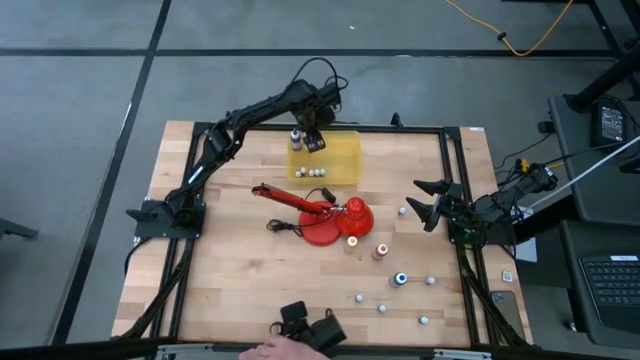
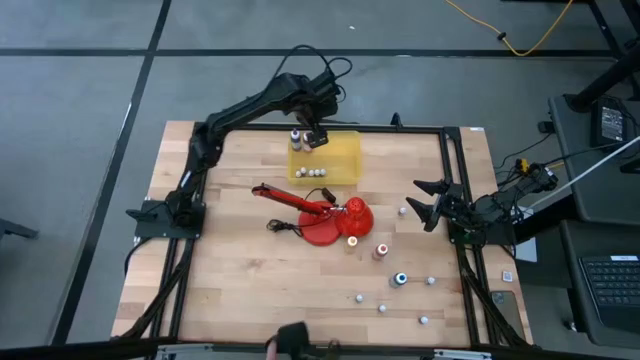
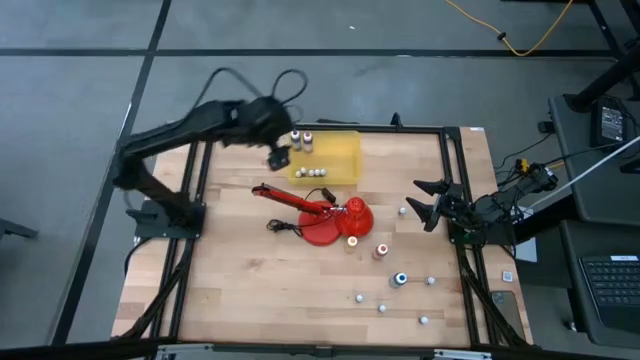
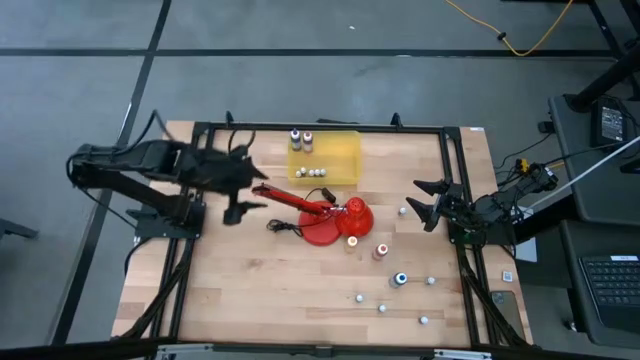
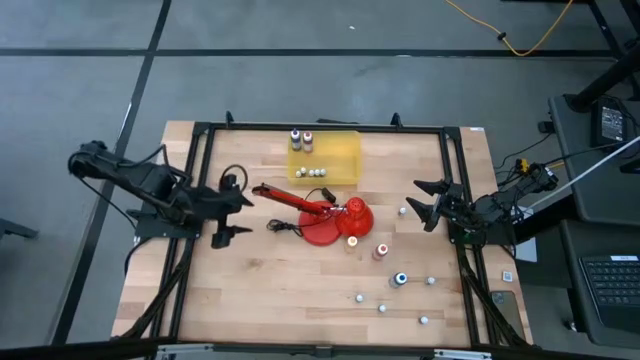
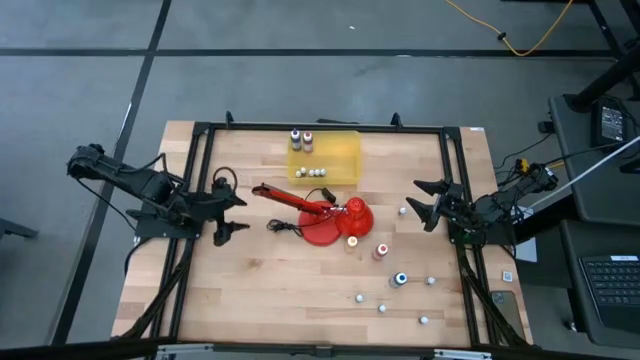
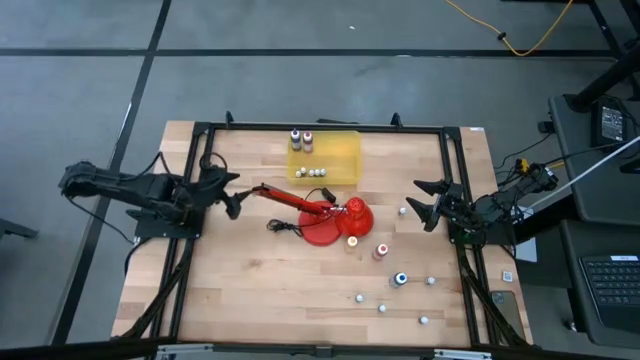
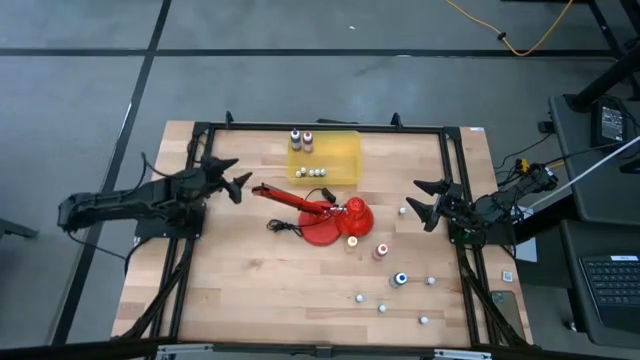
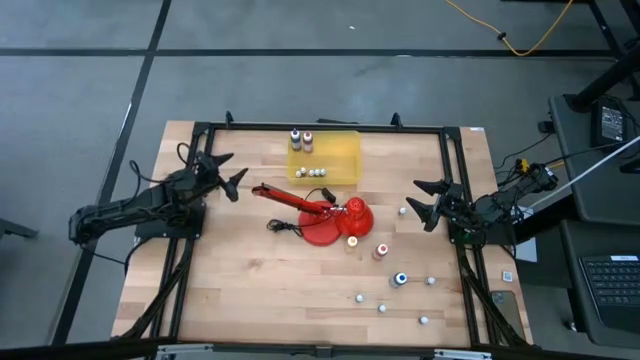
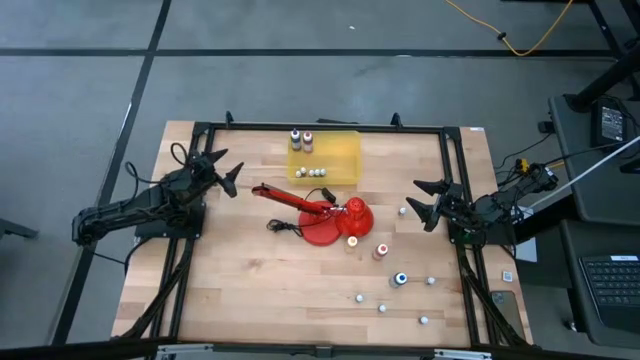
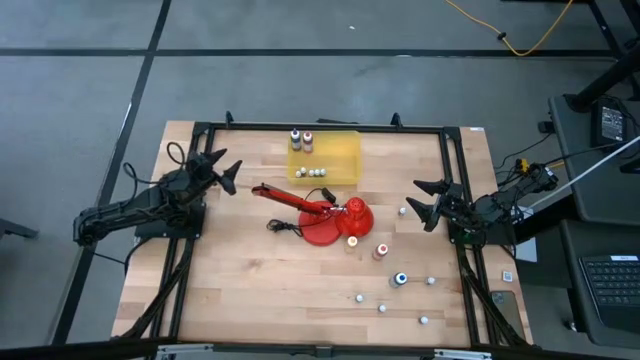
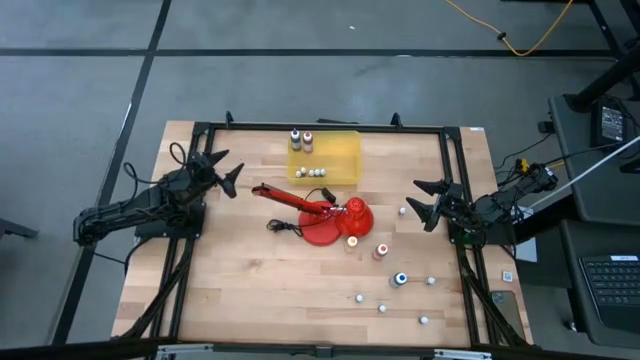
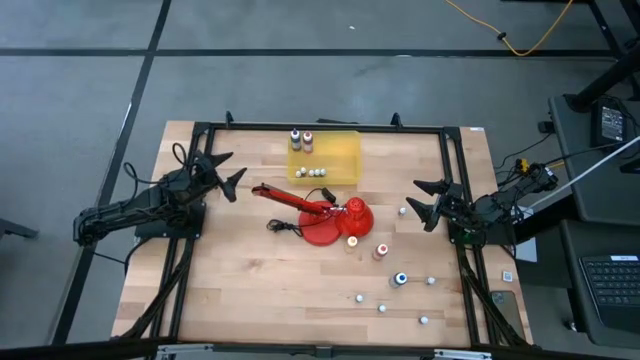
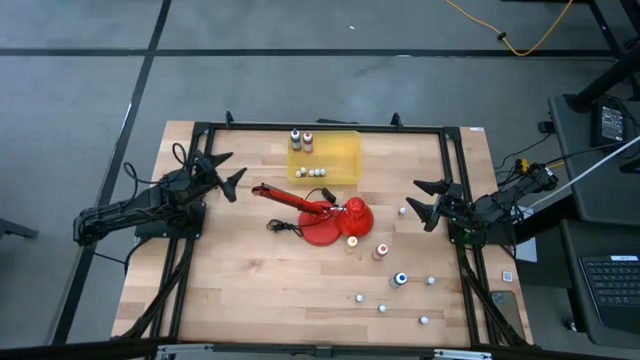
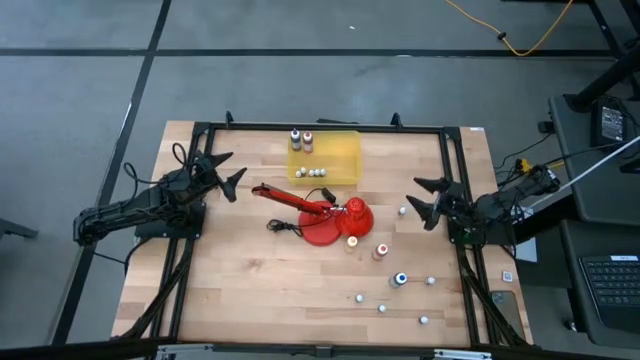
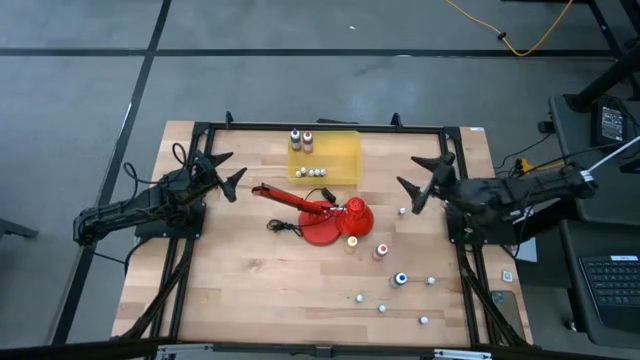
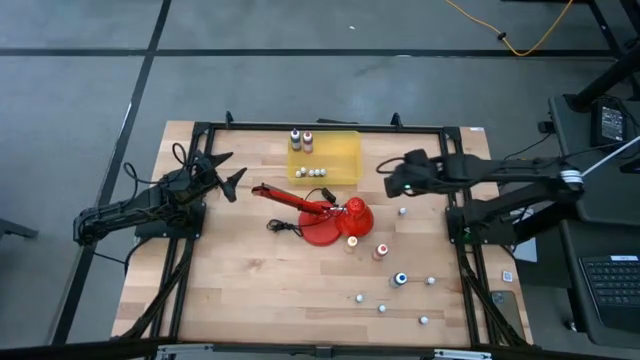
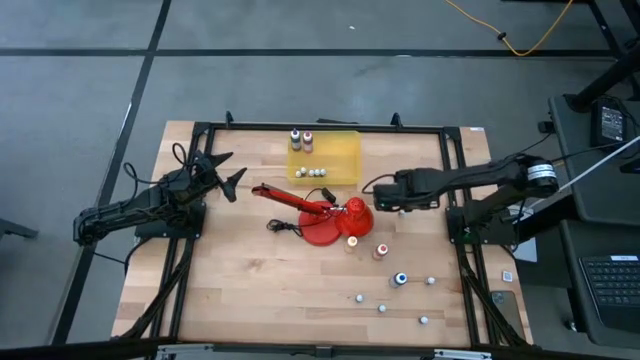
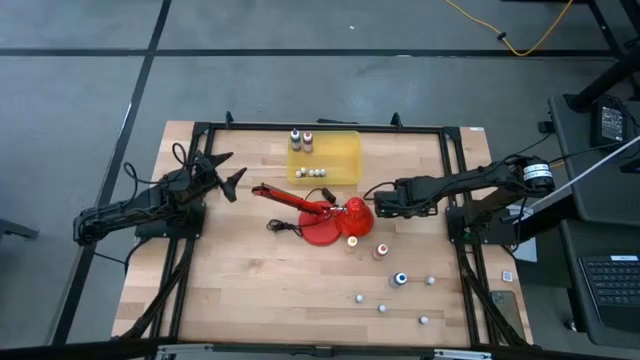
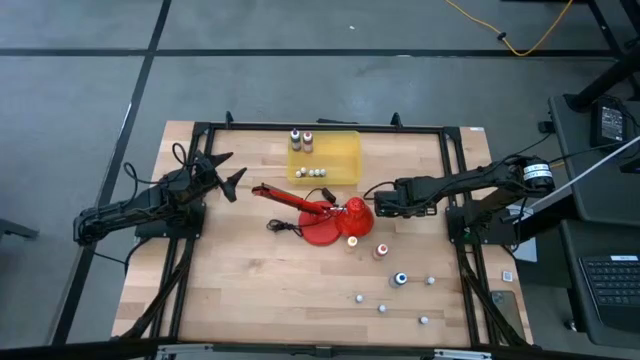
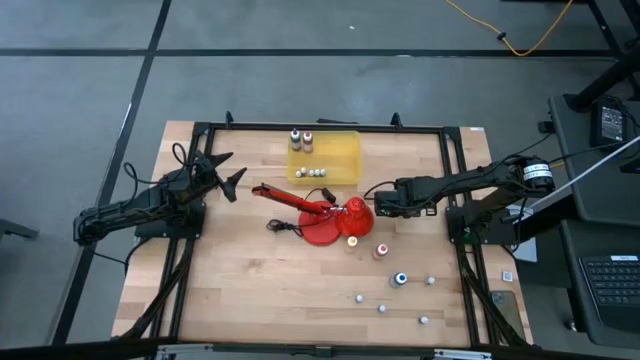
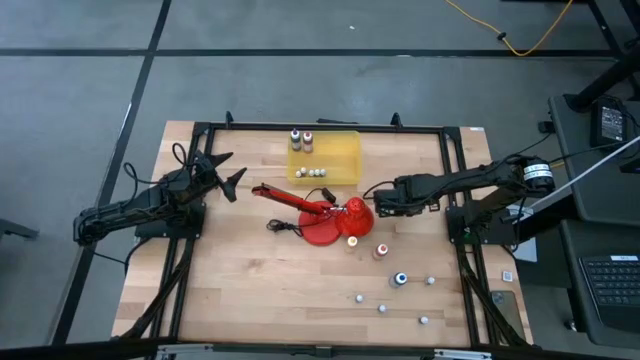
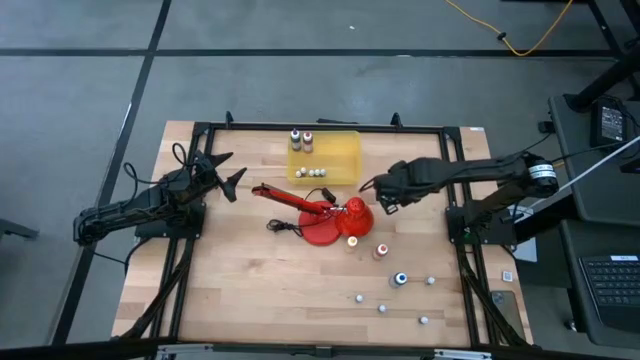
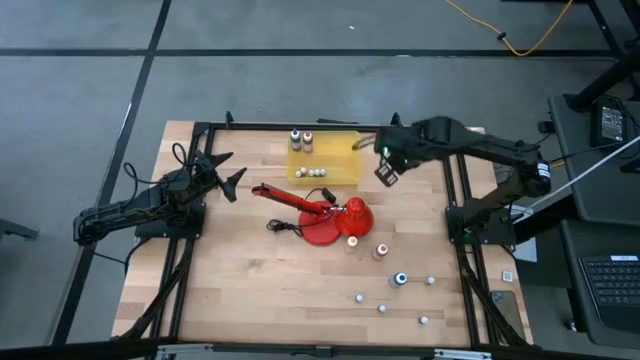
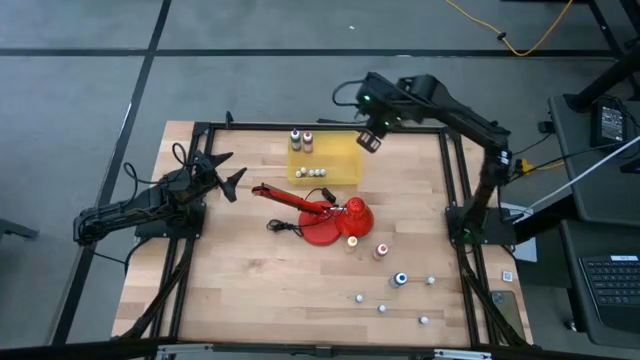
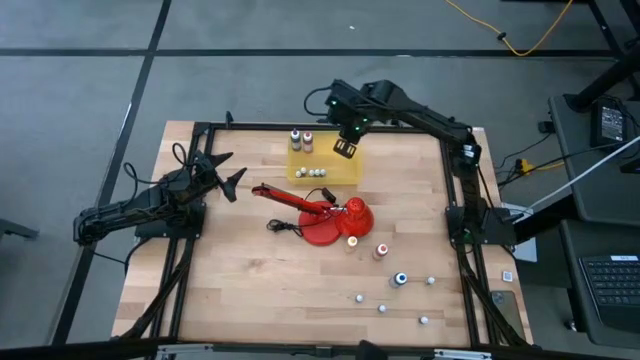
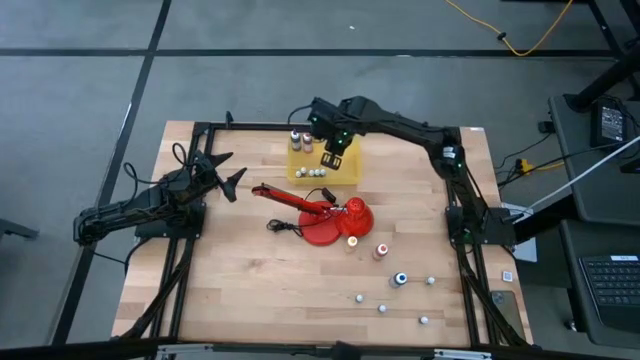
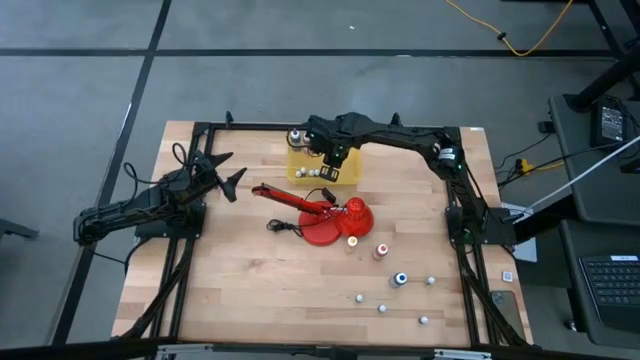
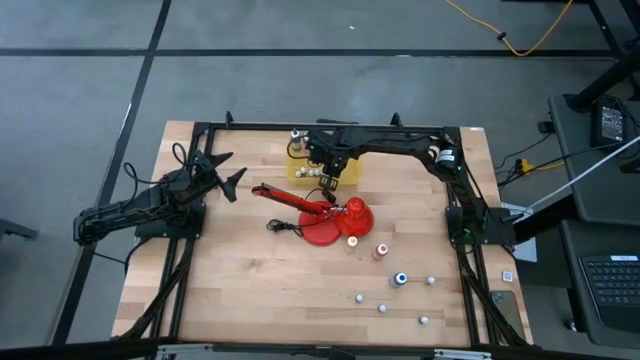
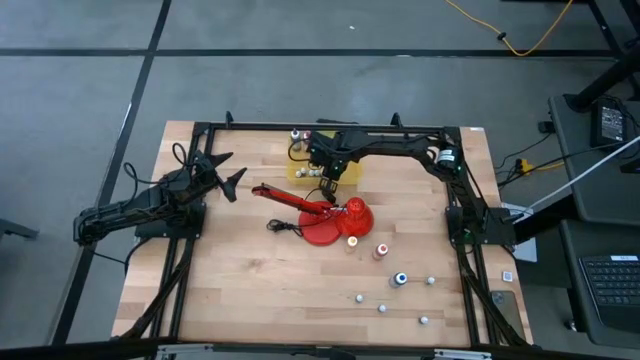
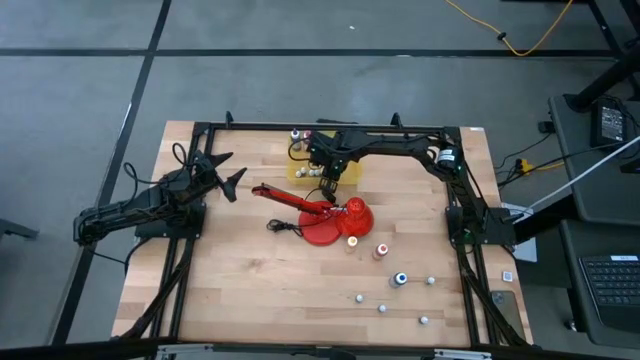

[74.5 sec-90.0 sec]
Task: Pick & Place food coloring
Put the black food coloring bottle into the yellow bin

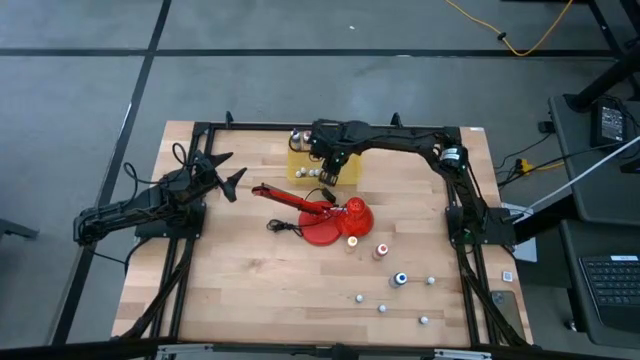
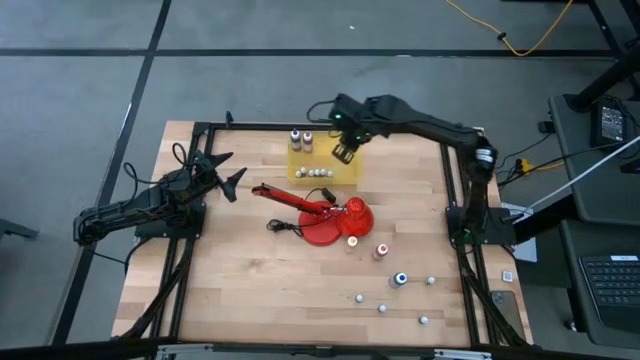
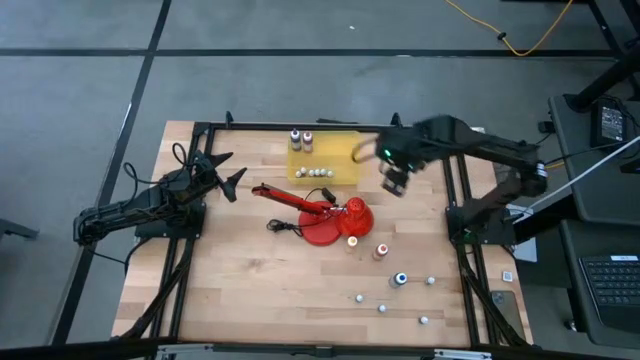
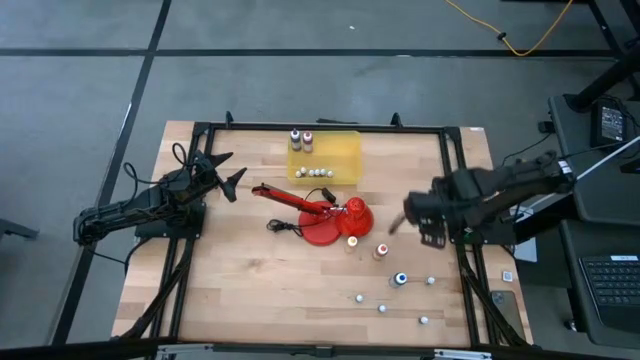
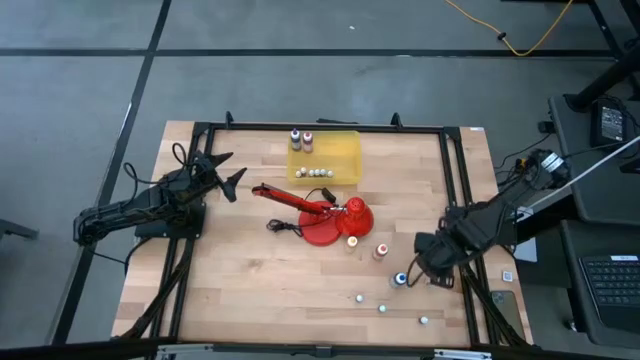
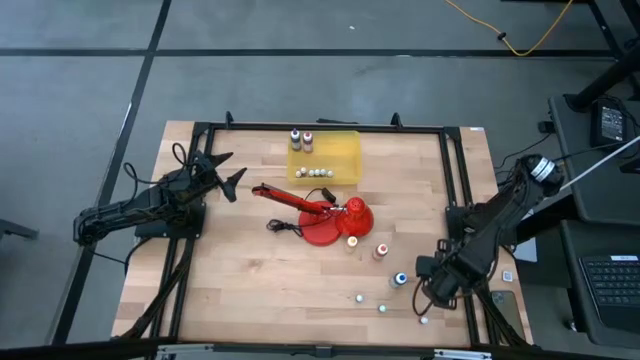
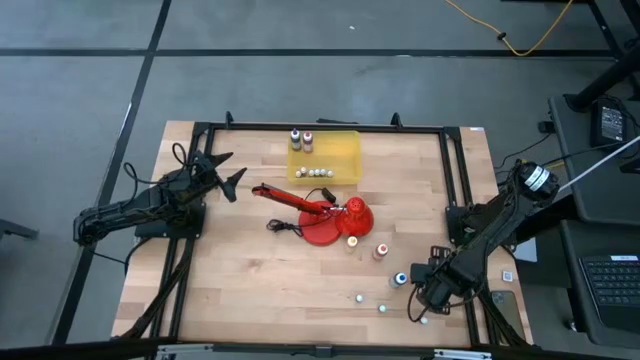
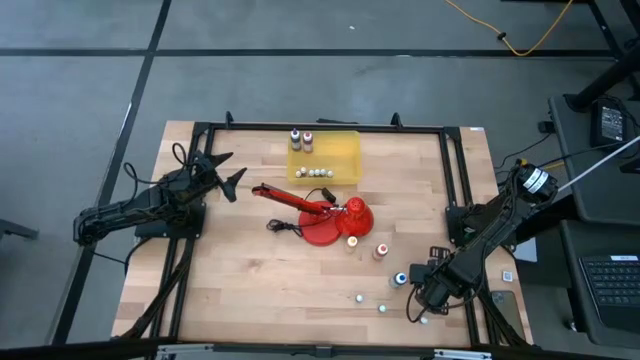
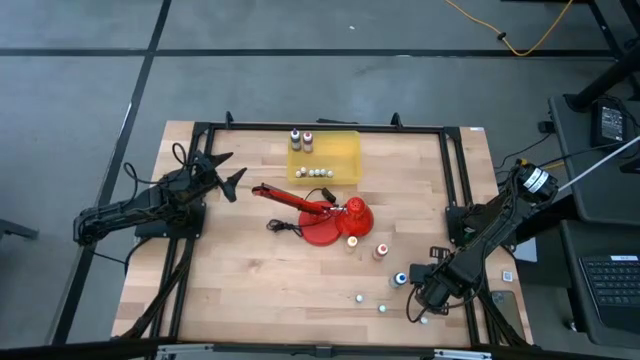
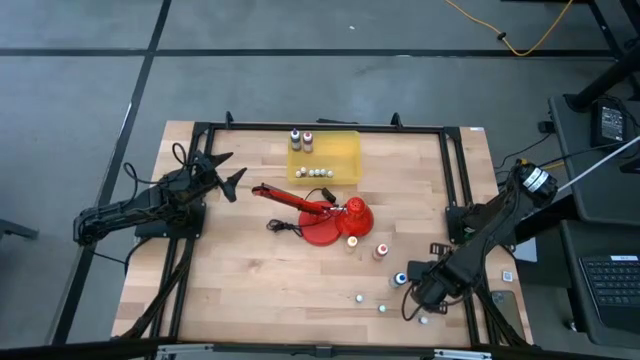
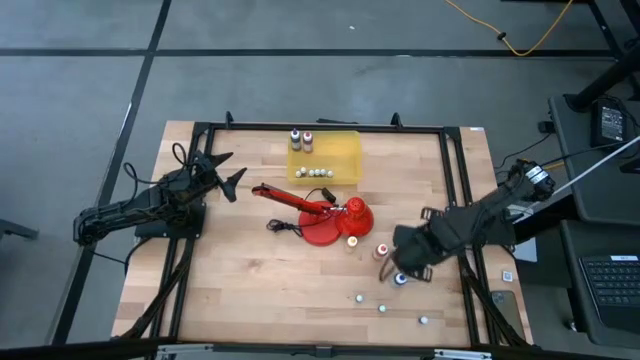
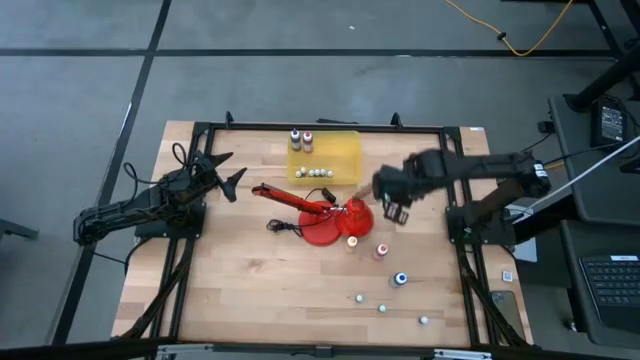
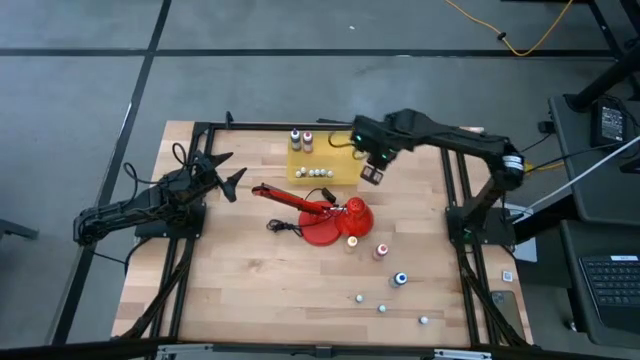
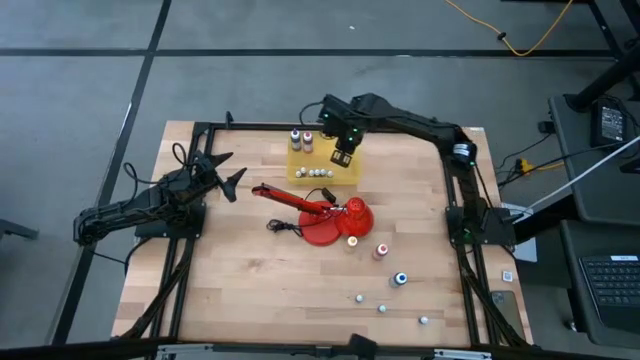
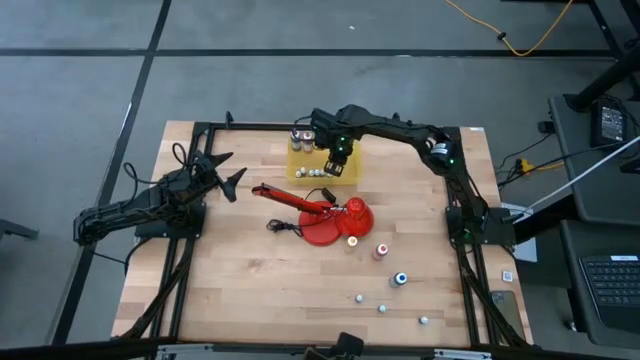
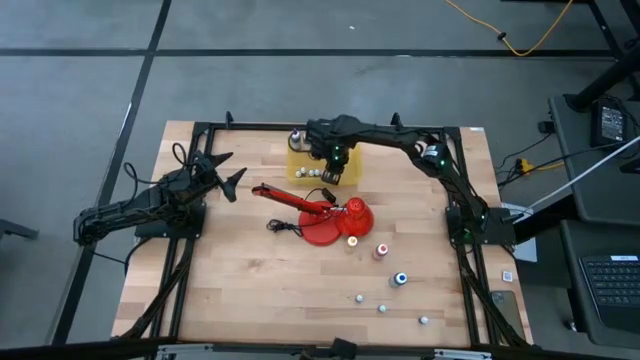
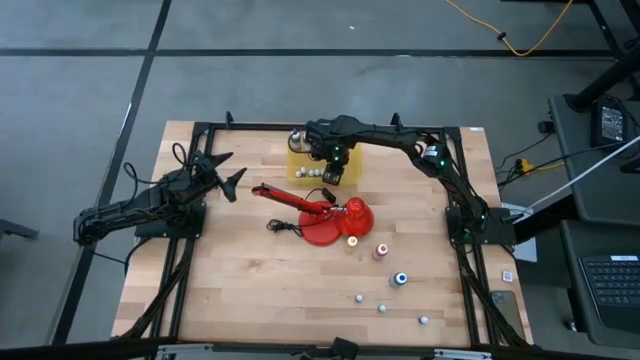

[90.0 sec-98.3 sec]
Put the black food coloring bottle into the yellow bin
